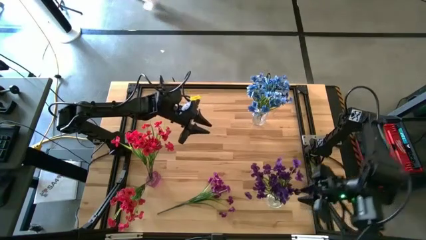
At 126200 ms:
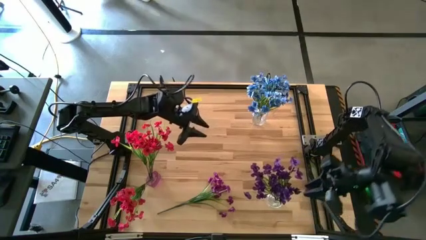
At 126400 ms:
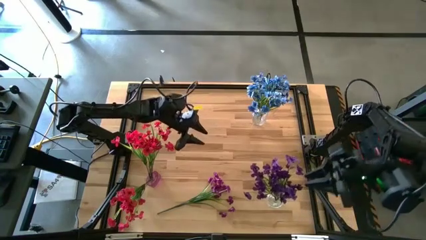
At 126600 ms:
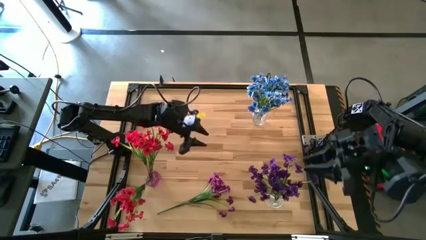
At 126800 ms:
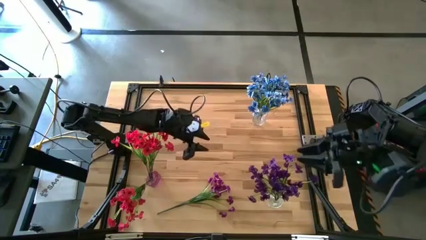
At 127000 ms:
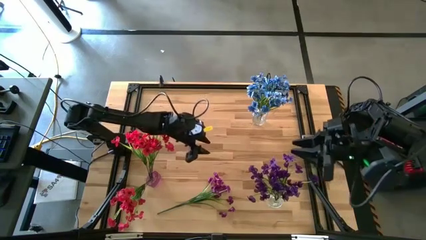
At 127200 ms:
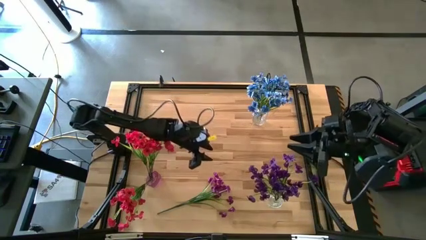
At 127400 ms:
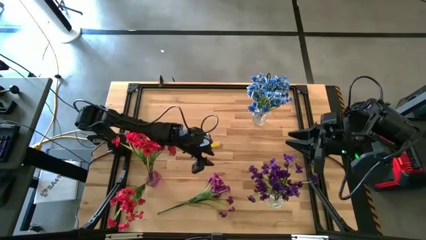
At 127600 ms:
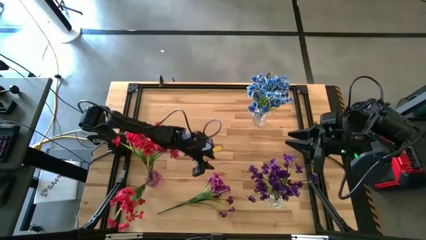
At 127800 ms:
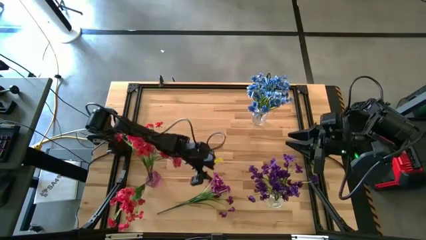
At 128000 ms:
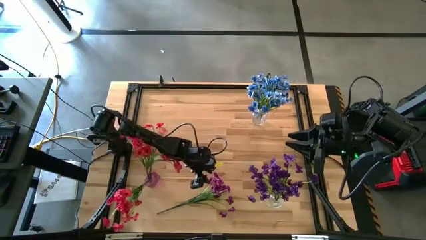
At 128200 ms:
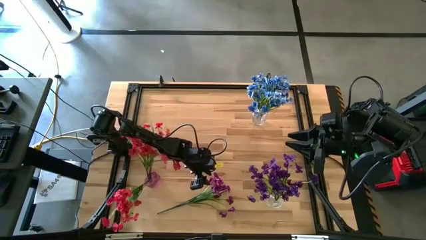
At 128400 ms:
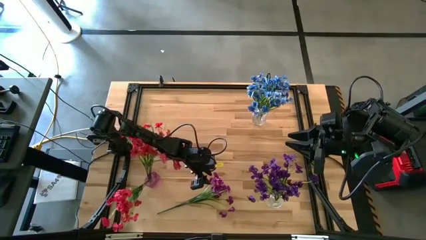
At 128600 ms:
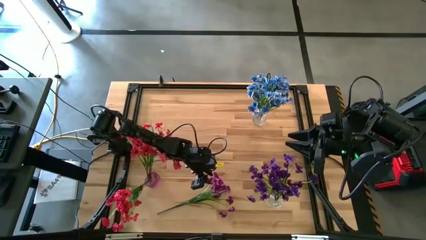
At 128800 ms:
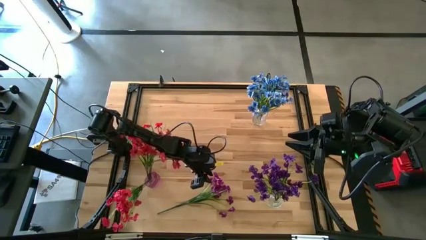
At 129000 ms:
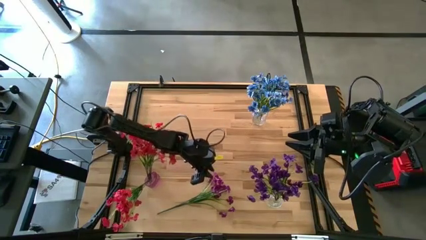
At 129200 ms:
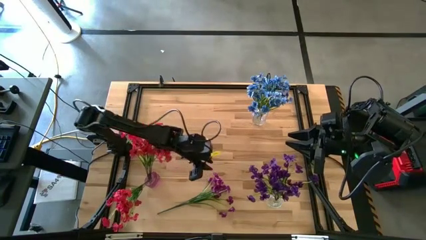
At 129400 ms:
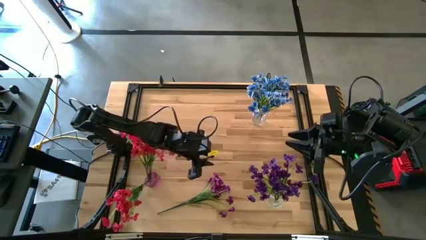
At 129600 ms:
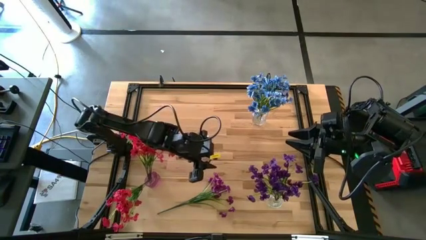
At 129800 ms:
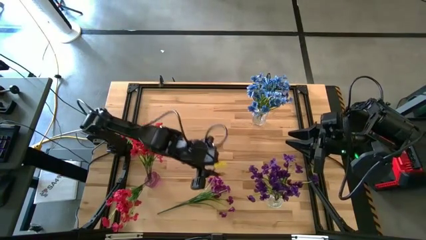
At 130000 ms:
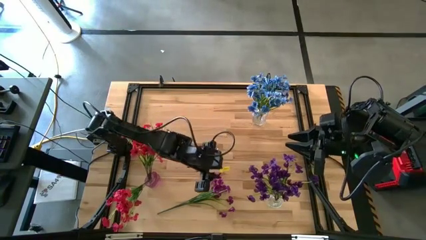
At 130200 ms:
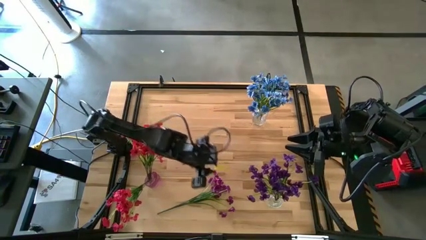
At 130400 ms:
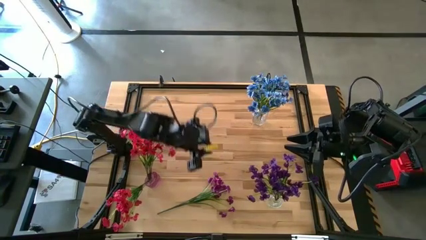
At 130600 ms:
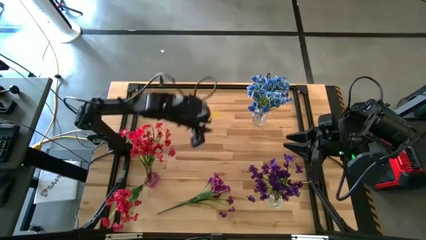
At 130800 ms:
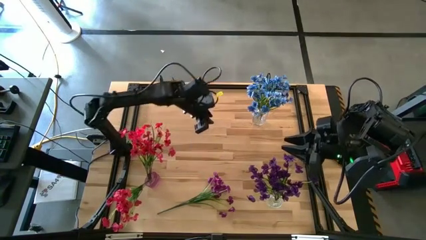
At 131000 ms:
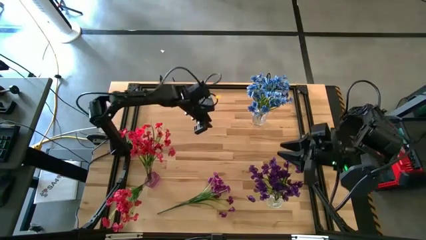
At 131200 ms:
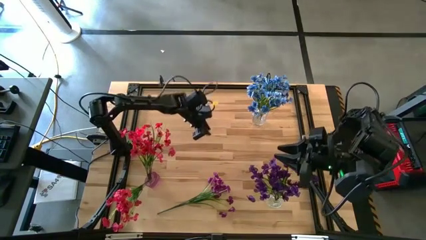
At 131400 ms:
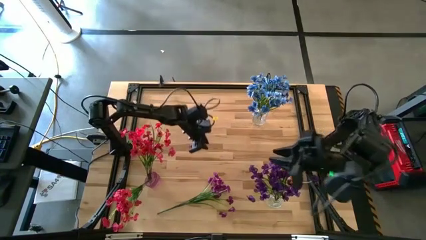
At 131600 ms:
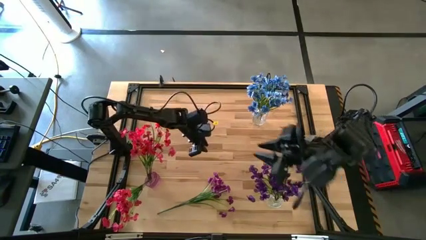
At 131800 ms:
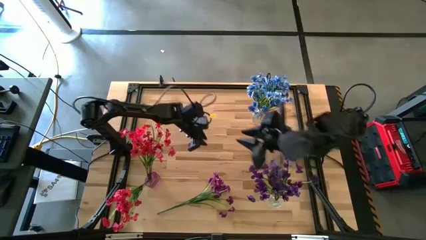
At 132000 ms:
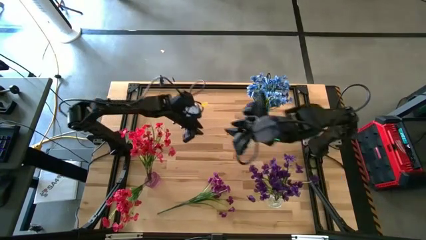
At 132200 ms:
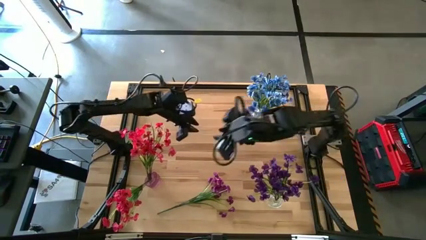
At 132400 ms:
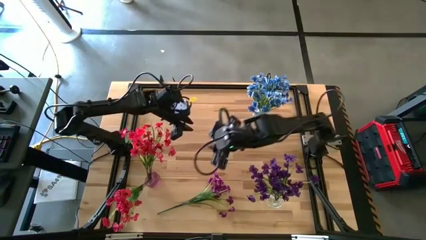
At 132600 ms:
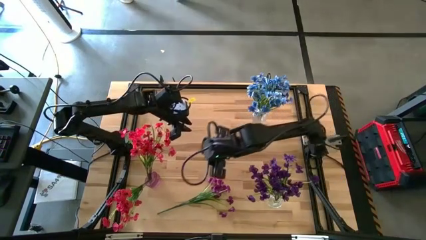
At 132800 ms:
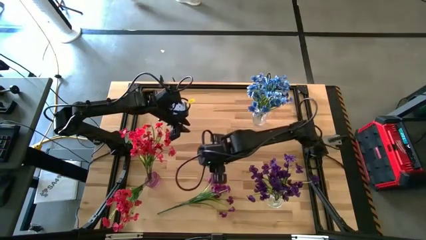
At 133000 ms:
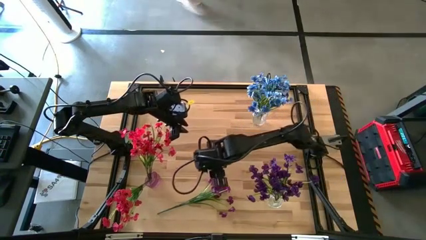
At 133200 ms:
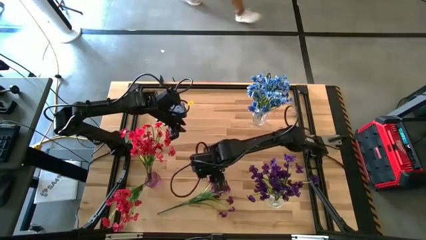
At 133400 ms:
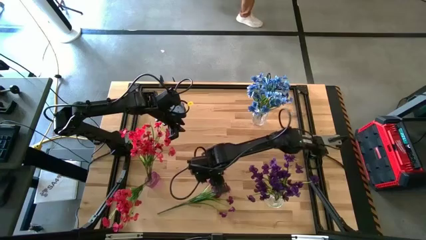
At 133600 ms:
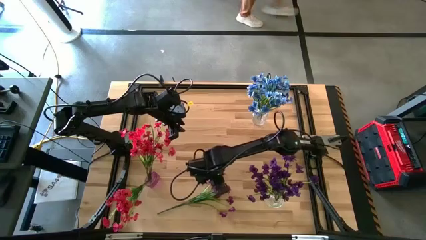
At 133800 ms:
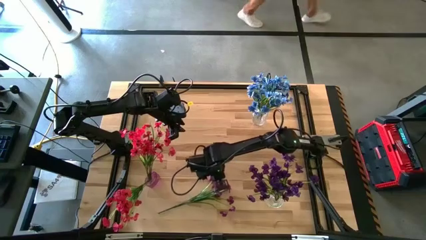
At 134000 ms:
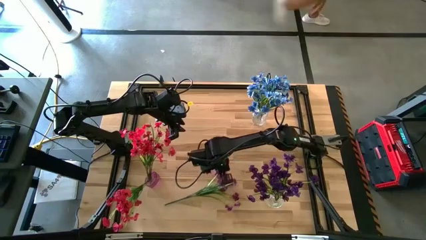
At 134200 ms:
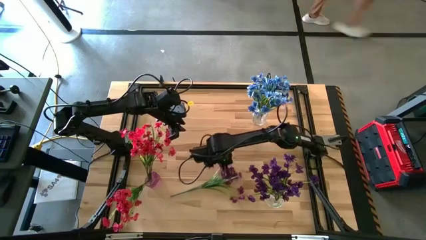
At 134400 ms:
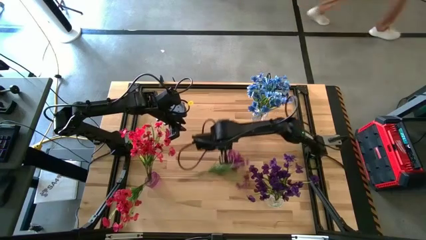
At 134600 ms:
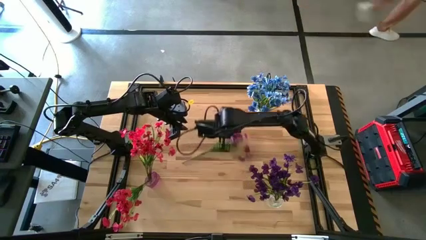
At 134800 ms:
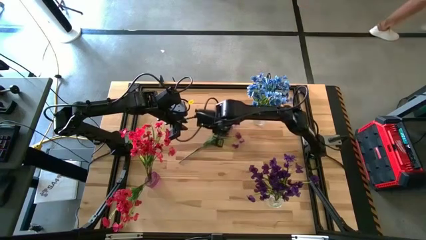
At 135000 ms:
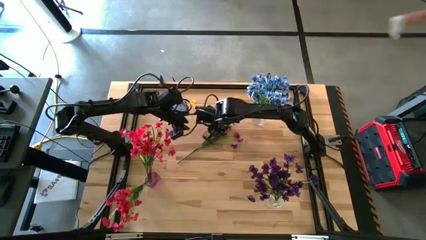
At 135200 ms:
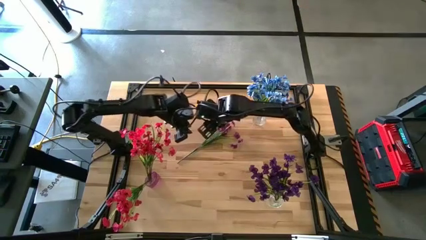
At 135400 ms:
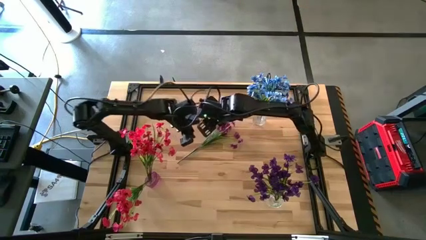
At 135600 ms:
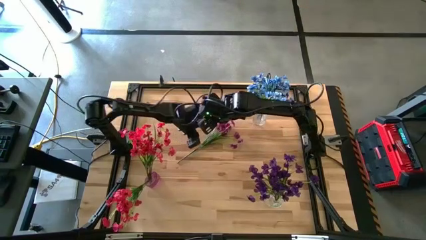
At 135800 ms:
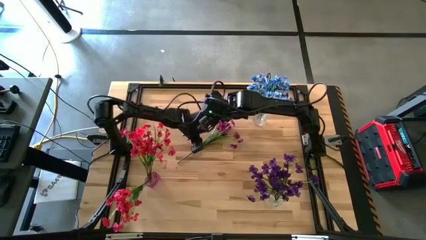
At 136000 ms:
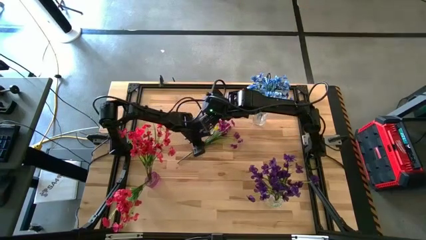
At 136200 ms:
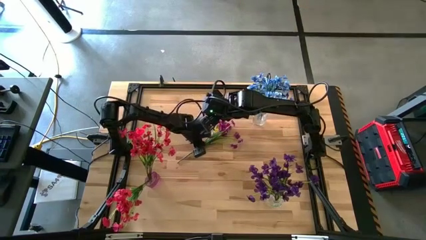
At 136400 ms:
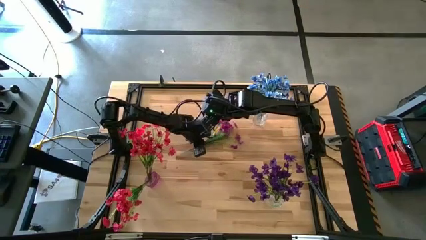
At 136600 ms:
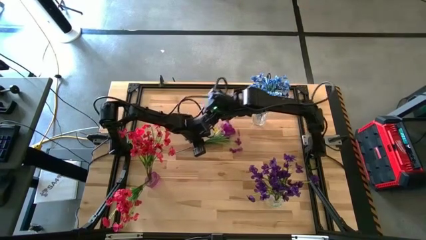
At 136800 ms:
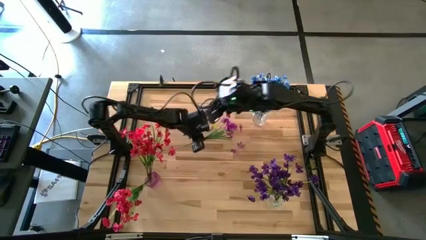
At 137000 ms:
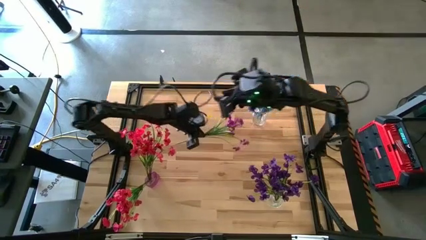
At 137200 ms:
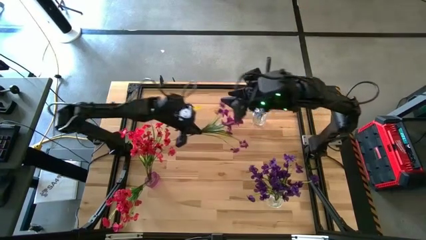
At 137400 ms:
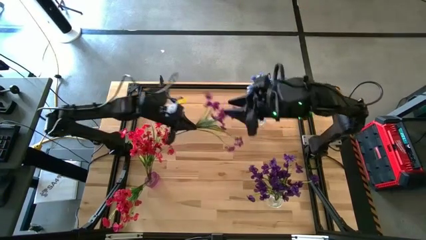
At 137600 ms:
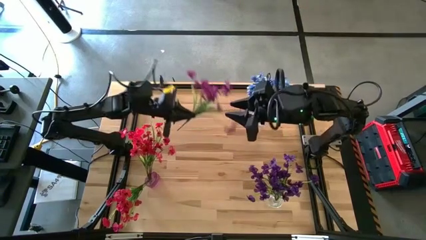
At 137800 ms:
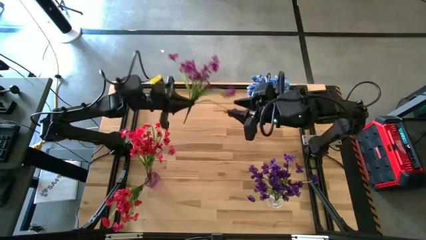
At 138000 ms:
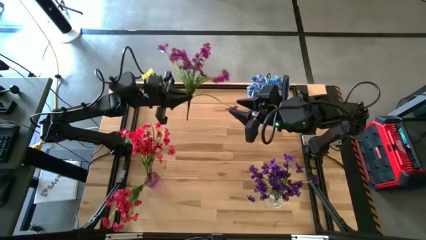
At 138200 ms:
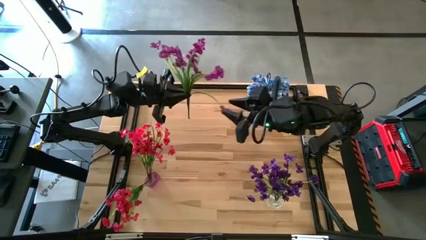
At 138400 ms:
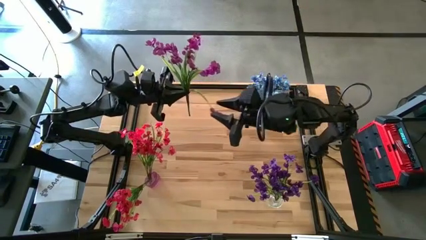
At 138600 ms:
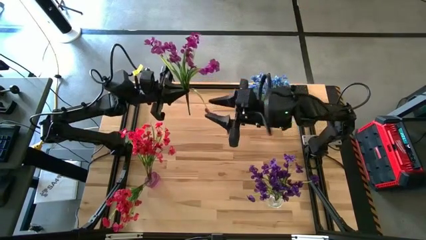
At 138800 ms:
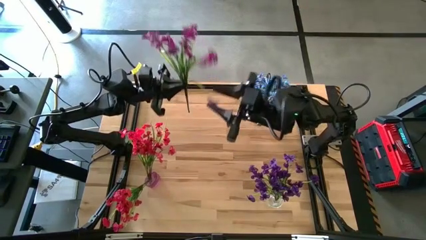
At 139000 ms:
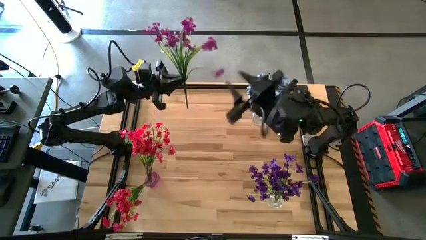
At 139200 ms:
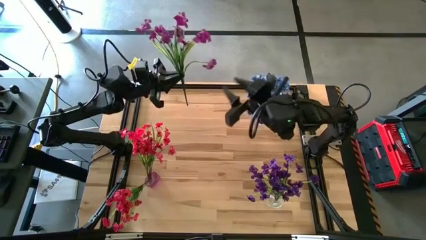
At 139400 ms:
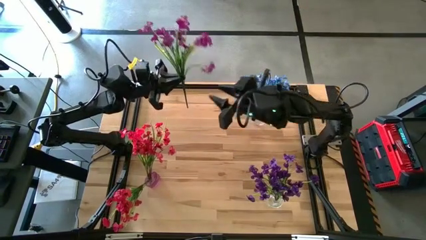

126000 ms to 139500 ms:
Task: Sort flowers into vase by color
Put the violet flower into the bottom transparent flower vase
